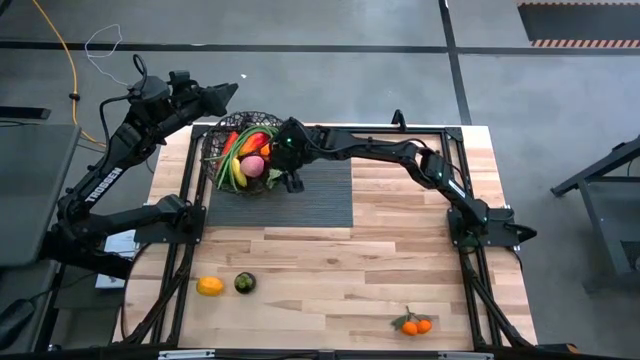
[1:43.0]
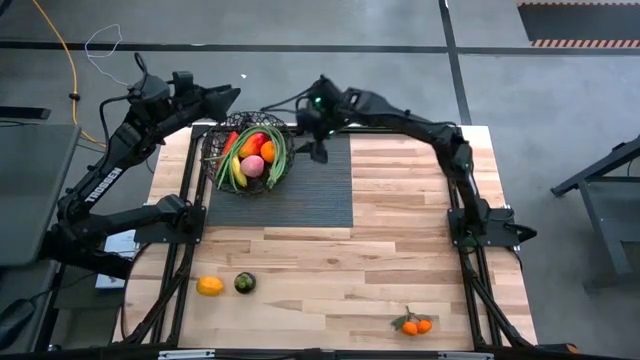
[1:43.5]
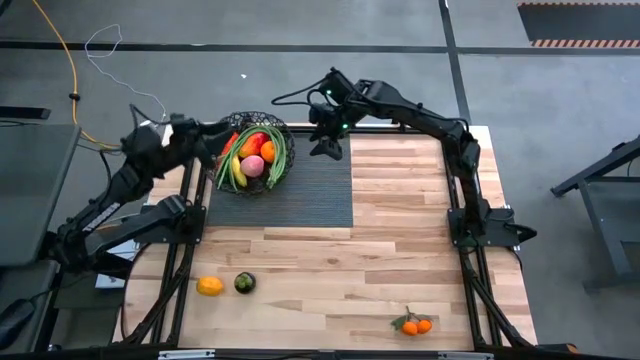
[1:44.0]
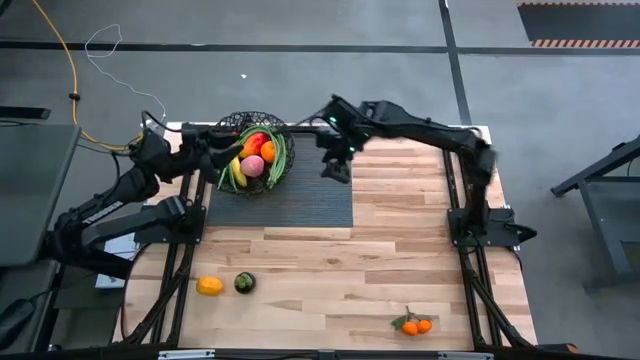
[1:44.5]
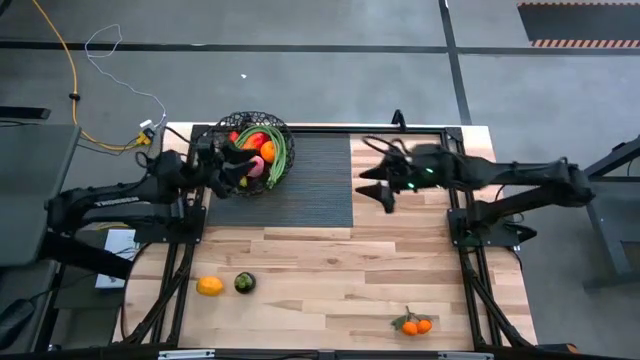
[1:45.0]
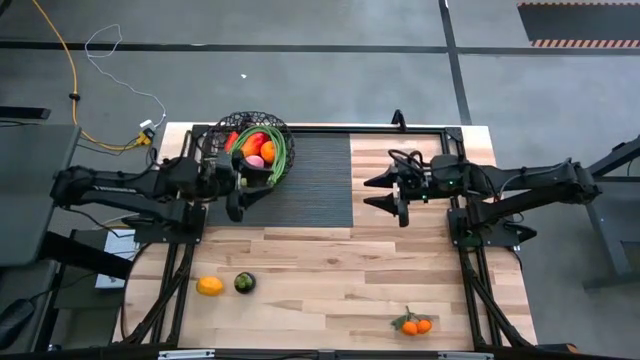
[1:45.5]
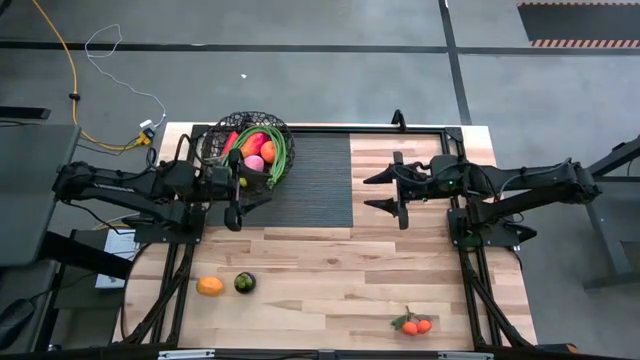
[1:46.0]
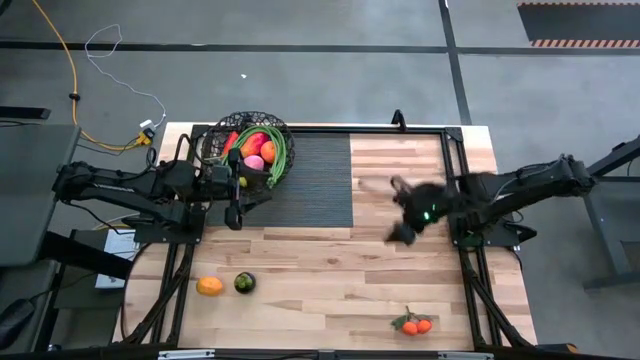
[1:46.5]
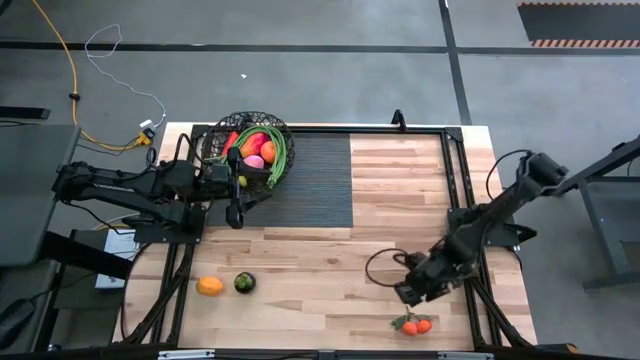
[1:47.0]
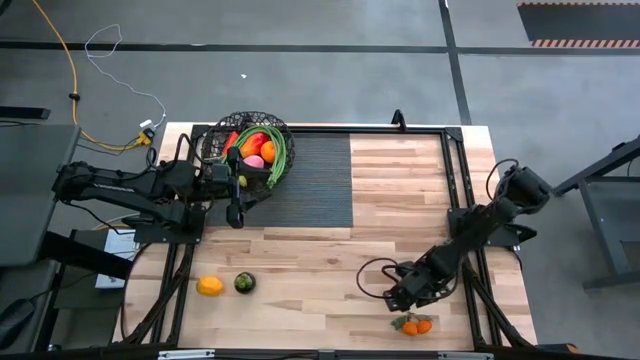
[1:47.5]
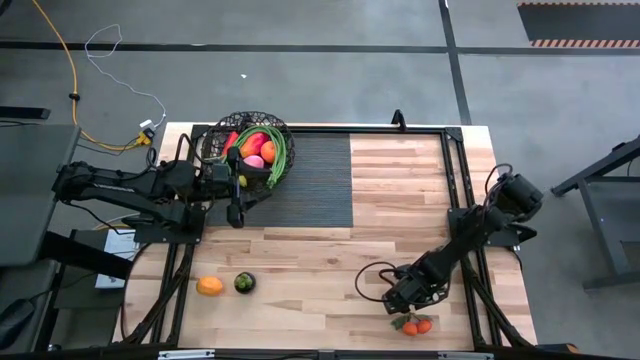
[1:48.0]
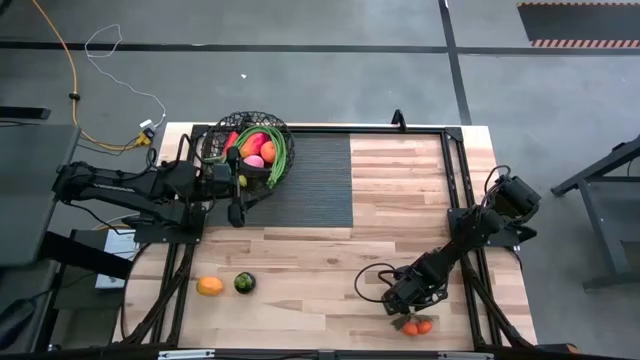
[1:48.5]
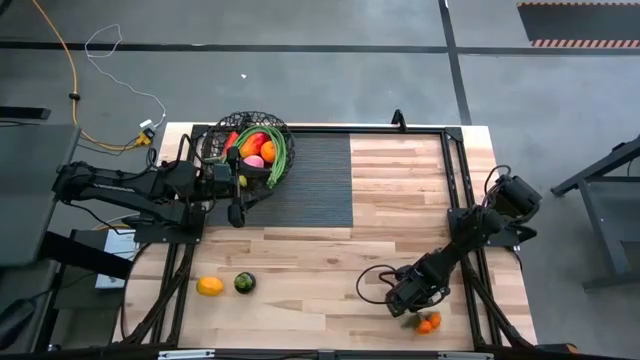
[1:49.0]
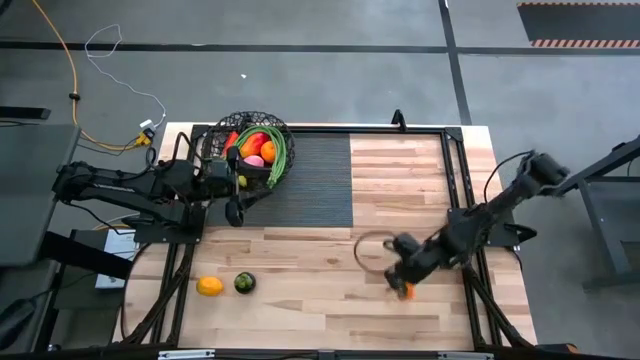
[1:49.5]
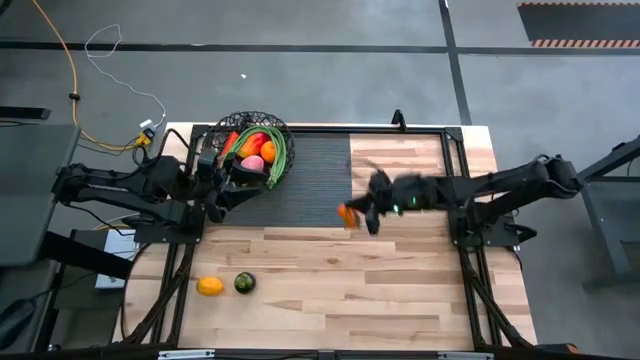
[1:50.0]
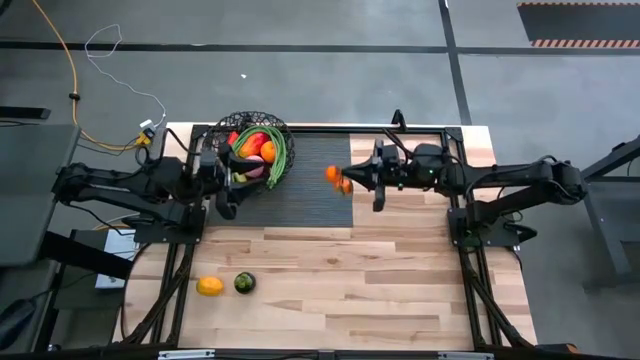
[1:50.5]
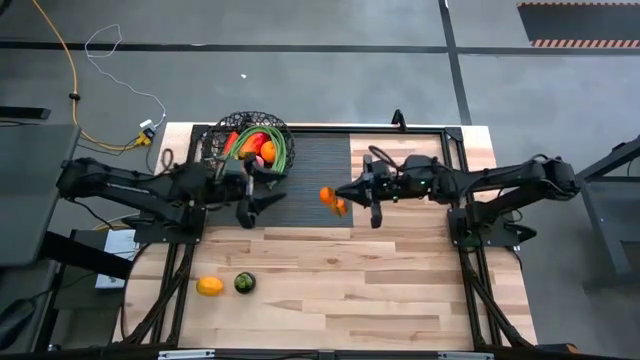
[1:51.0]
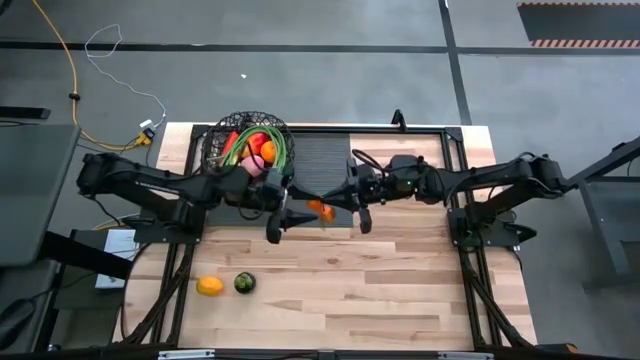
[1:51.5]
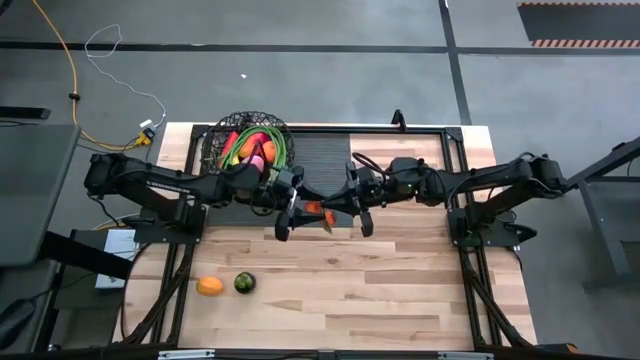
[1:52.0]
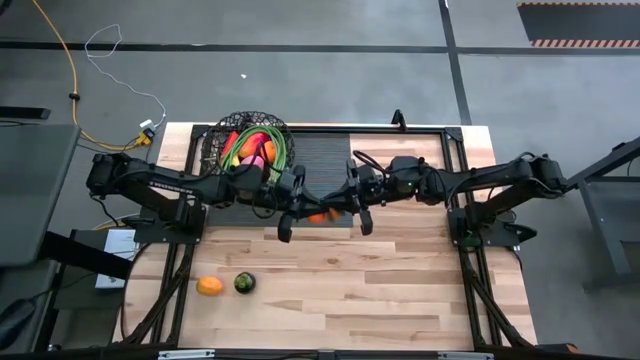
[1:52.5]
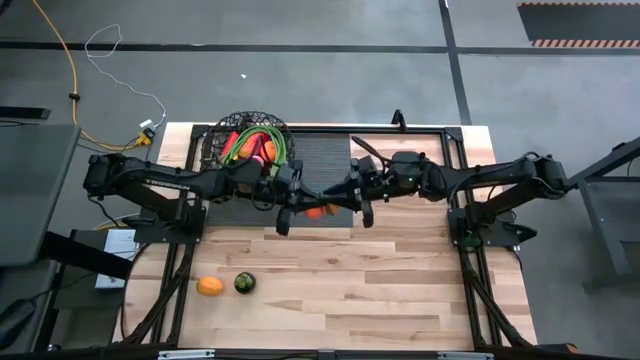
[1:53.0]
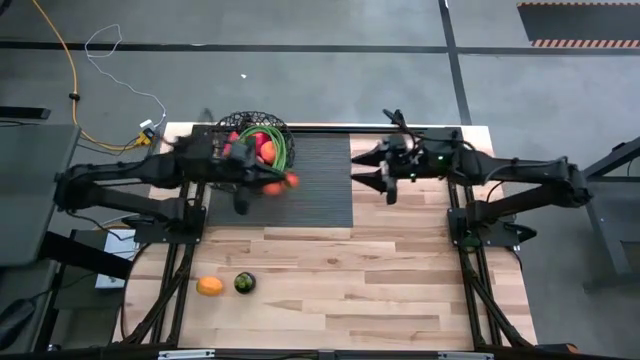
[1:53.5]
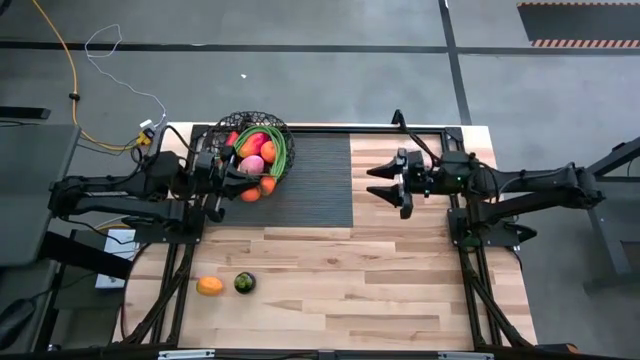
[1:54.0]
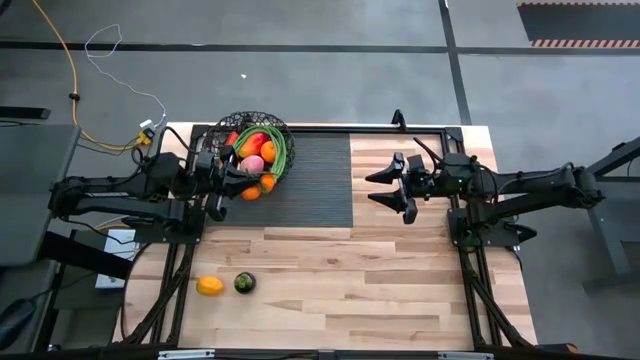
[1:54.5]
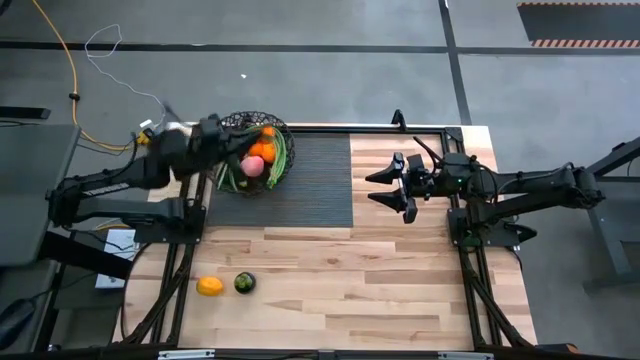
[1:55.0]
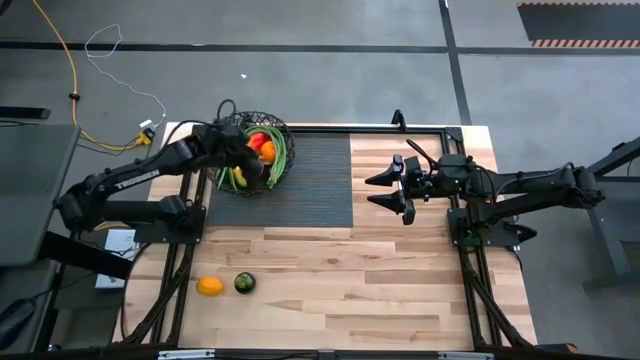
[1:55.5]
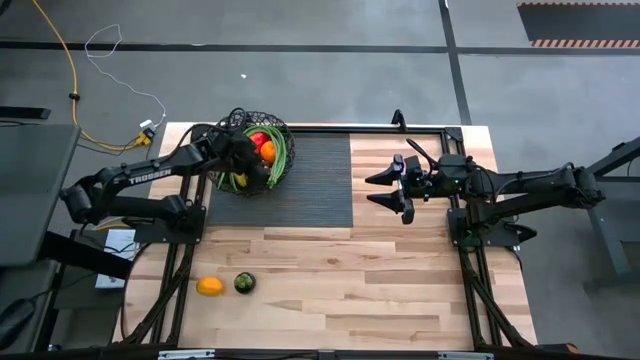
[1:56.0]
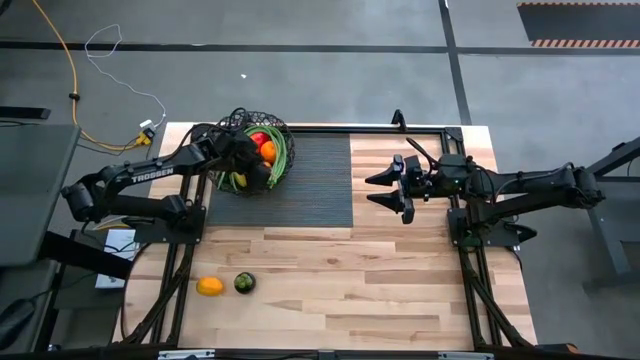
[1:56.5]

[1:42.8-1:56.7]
Task: Build produce basket
Put the tangerine into the black basket

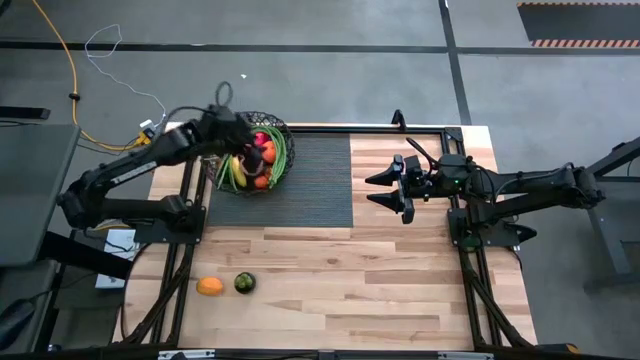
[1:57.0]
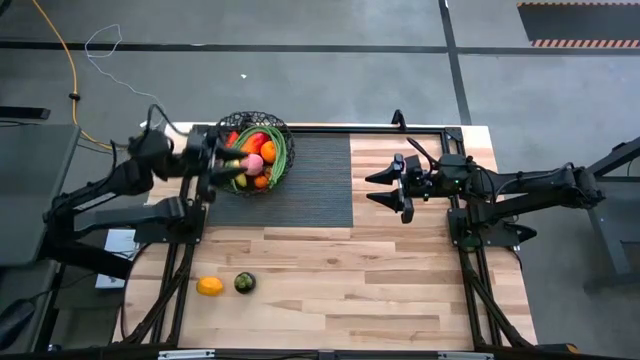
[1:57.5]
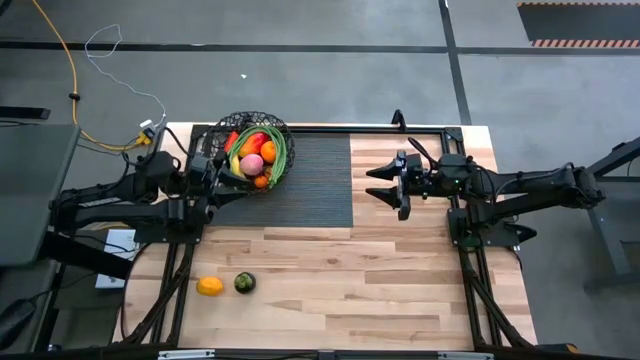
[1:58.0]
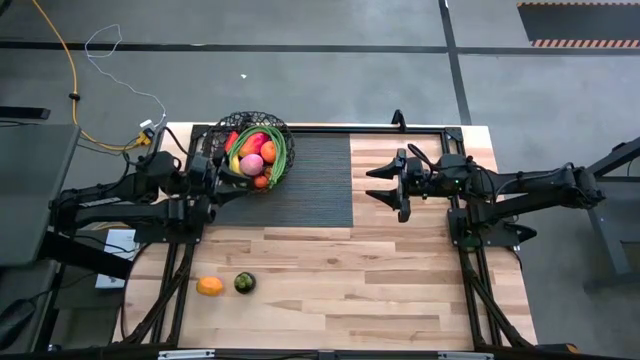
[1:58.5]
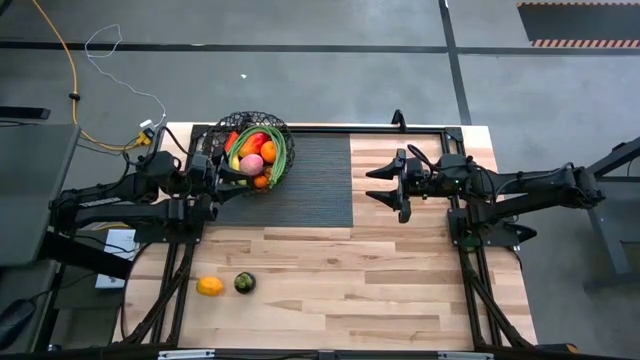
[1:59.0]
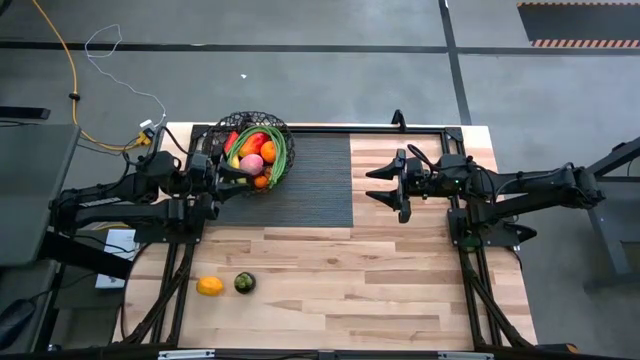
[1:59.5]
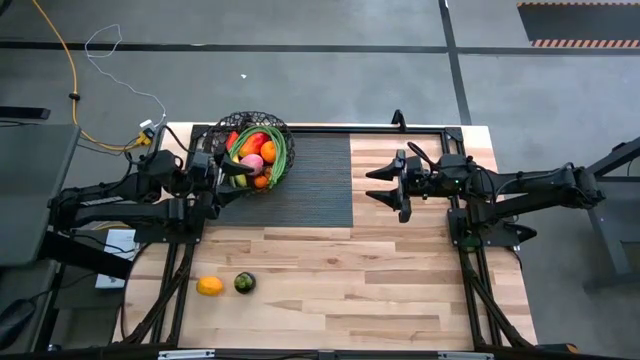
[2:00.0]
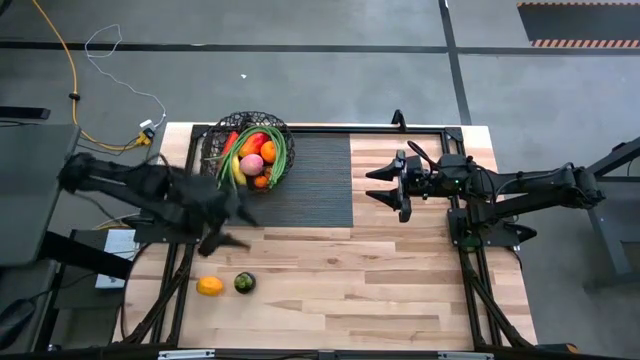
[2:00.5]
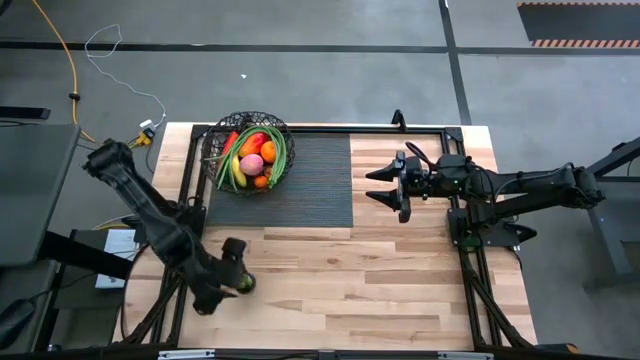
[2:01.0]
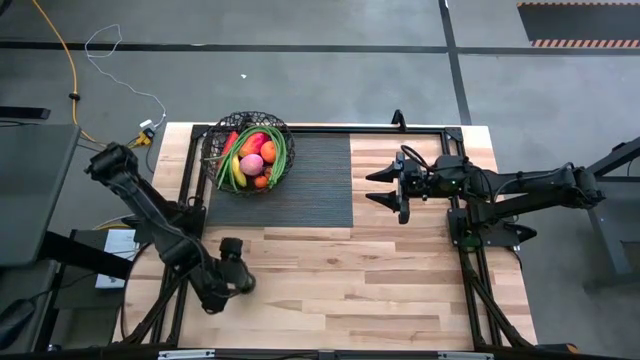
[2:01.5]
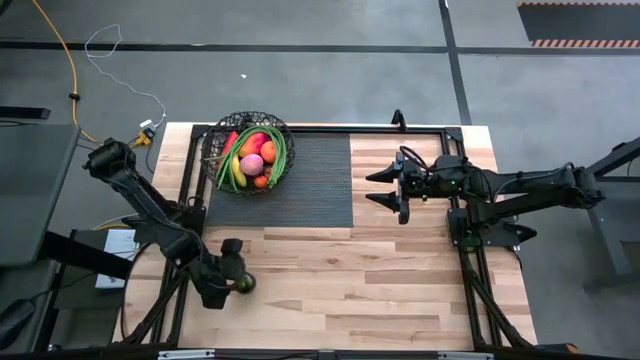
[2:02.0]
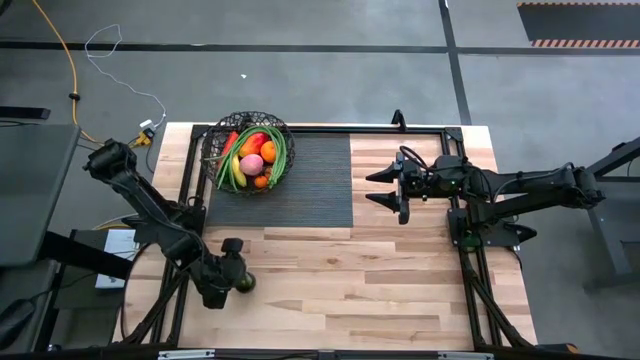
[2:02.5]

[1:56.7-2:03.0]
Put the black mangosteen into the black basket

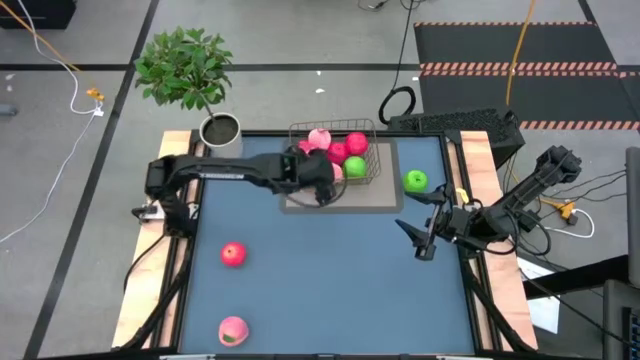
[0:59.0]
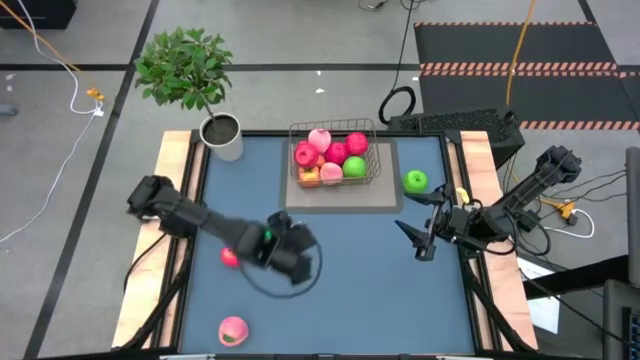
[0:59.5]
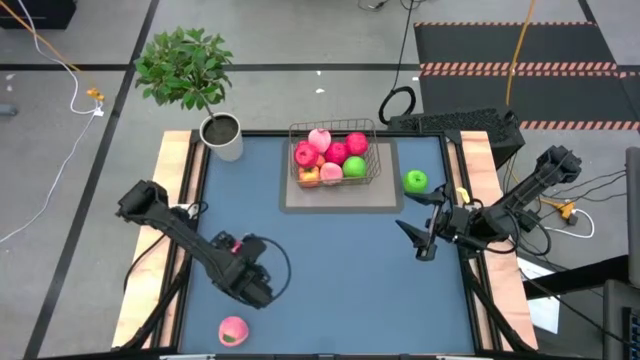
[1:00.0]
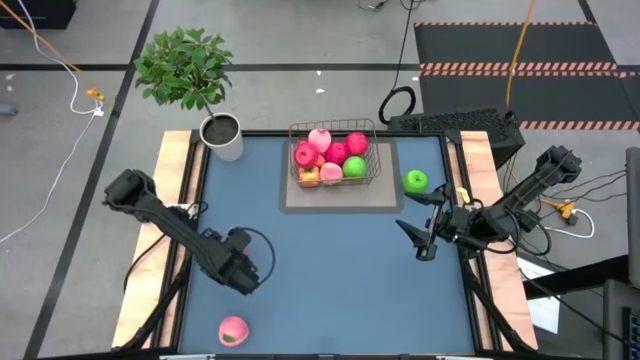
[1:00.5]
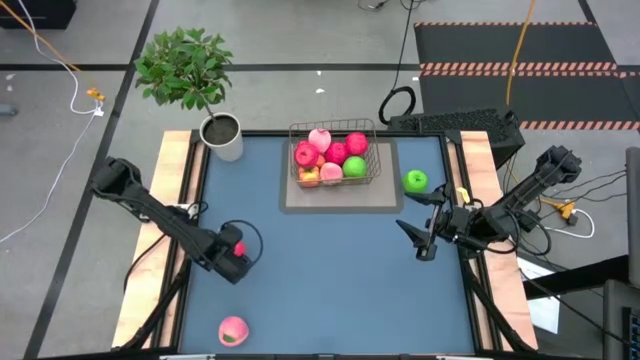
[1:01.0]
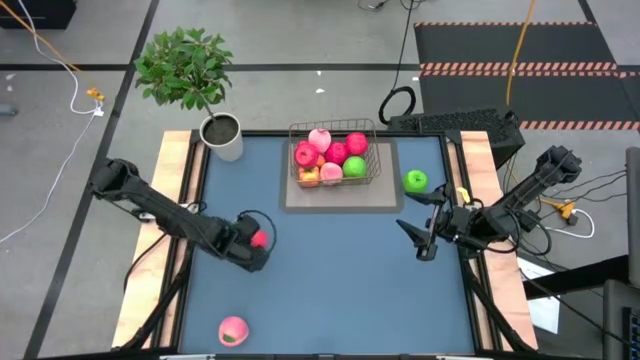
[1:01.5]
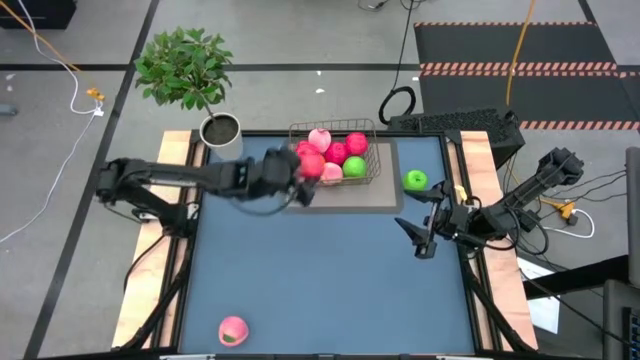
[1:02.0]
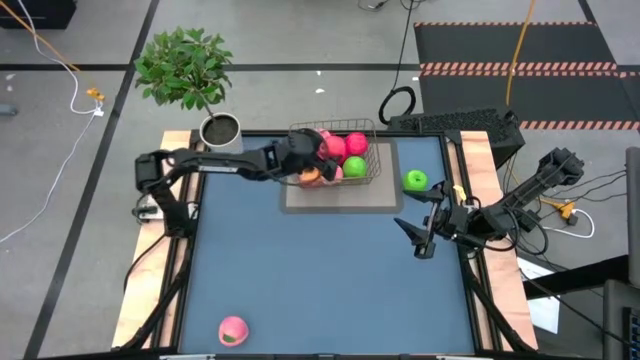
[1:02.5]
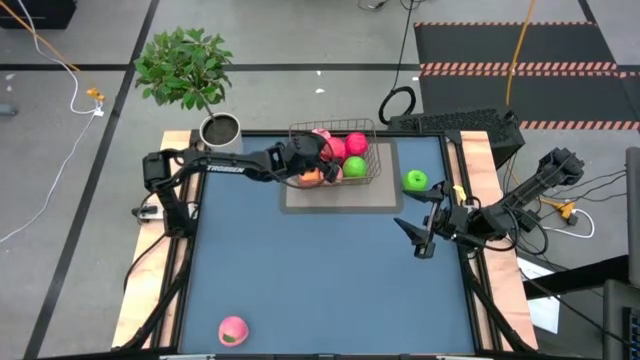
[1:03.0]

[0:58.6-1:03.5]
Task: Build produce basket
Put the red apple into the wire basket
